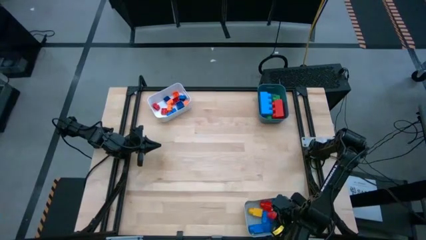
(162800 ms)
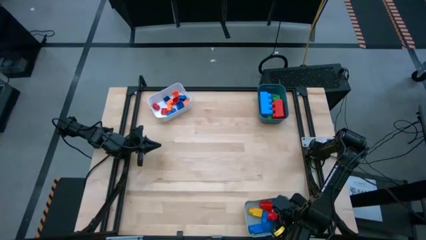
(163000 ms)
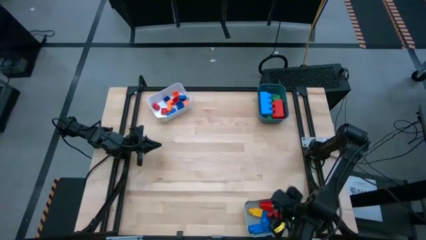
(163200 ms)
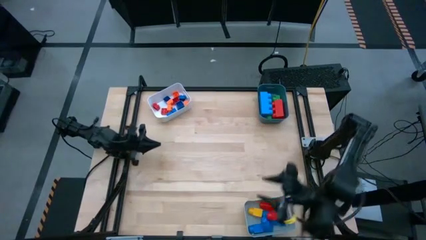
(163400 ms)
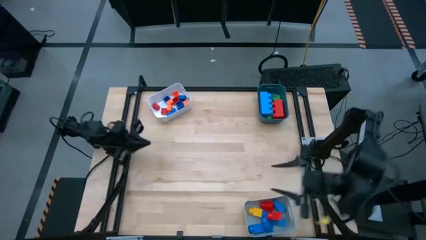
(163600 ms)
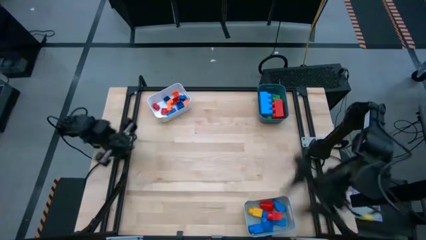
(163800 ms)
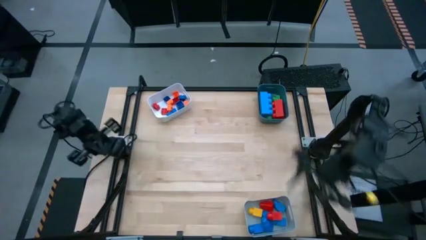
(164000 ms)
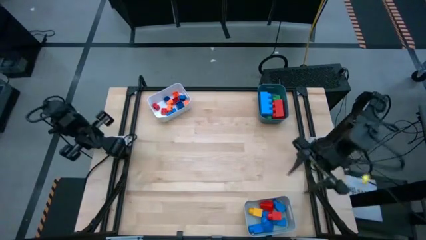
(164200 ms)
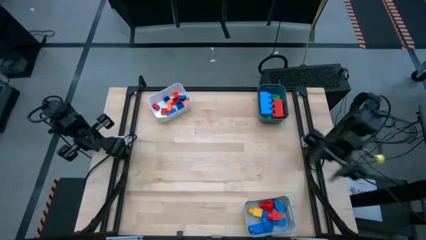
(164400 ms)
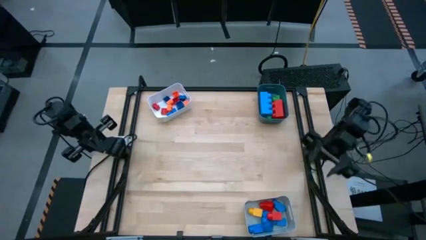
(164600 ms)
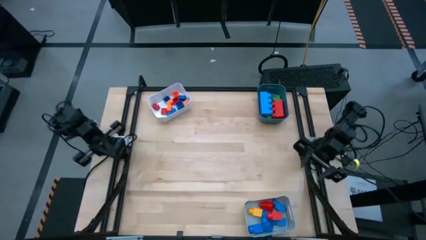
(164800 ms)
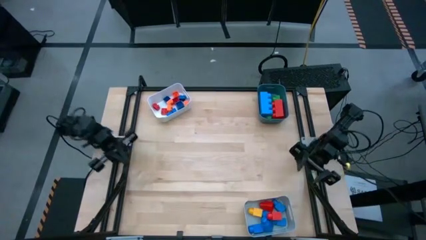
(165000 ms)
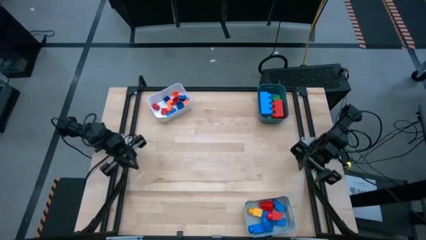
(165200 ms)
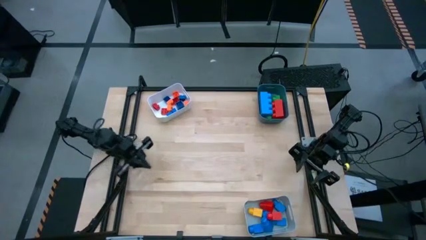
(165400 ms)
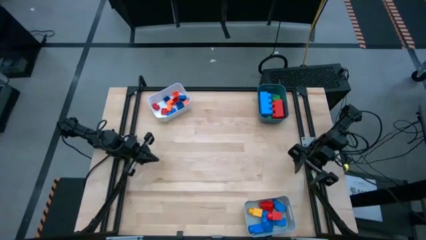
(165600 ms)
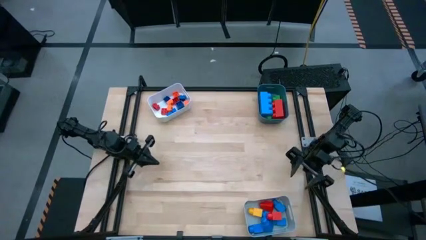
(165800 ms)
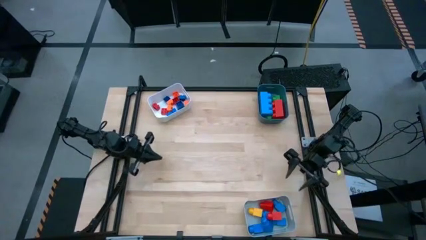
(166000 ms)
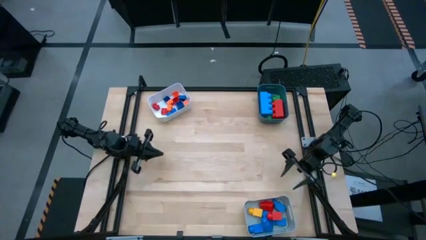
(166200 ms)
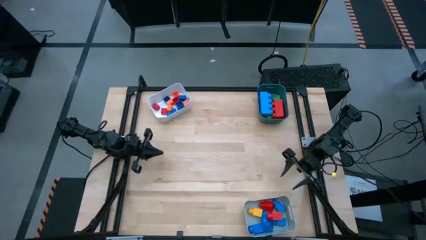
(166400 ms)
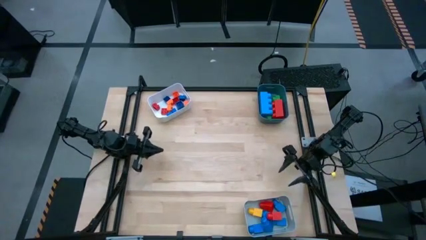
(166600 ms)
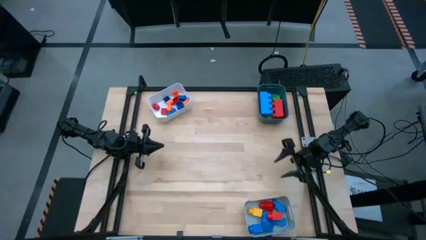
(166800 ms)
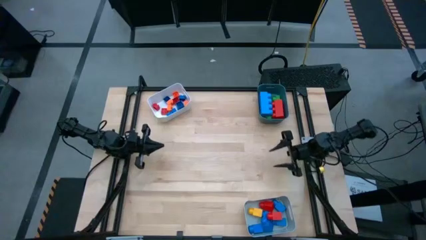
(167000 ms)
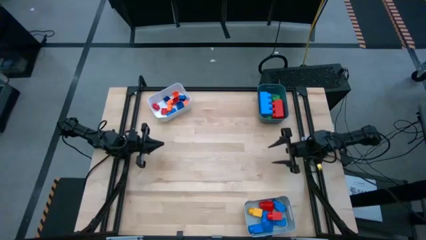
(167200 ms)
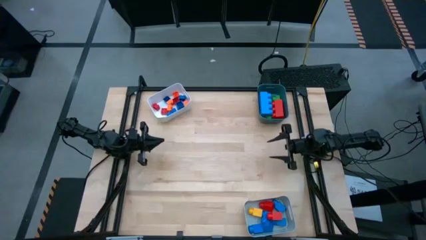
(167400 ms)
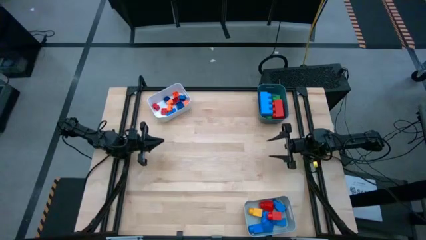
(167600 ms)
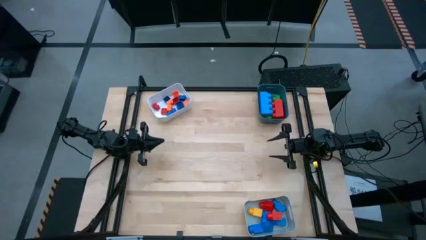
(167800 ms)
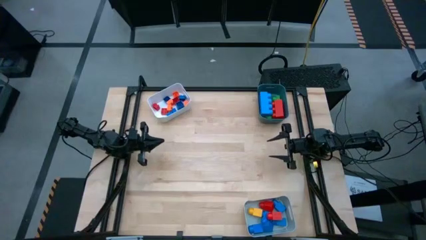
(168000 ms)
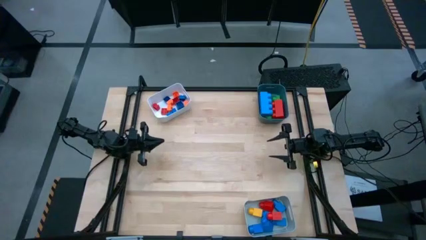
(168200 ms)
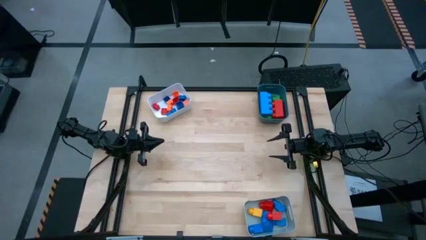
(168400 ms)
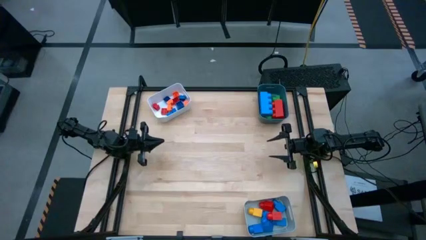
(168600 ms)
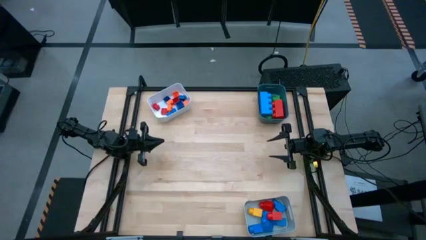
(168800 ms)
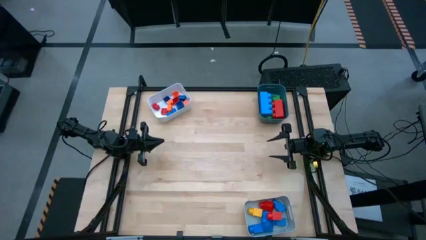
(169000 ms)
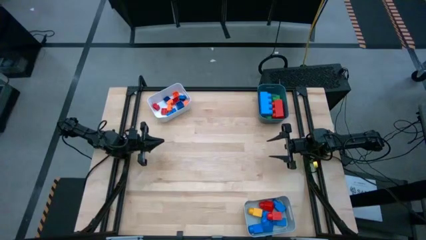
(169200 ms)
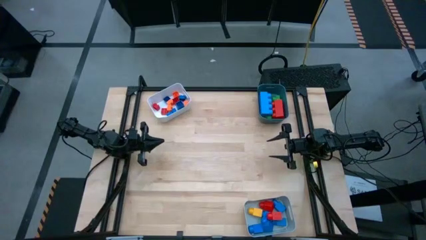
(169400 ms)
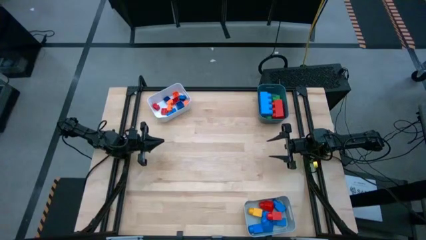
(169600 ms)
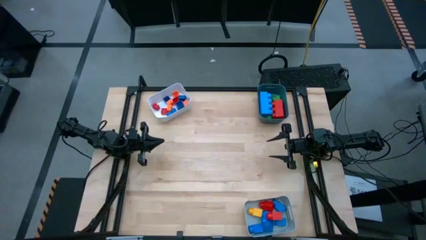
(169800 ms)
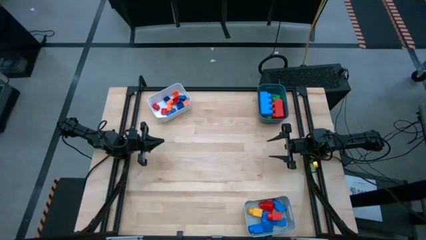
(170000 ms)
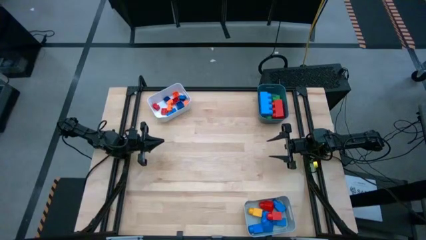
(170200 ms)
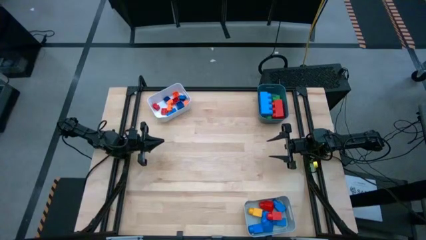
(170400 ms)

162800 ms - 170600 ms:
Task: Sort blocks by size
Return to Home Position

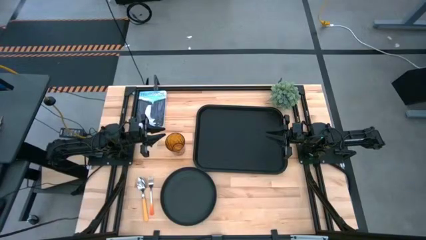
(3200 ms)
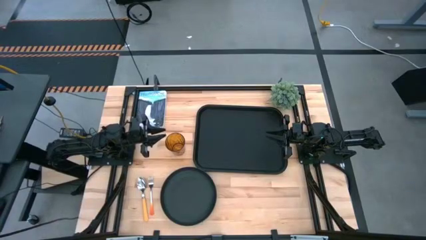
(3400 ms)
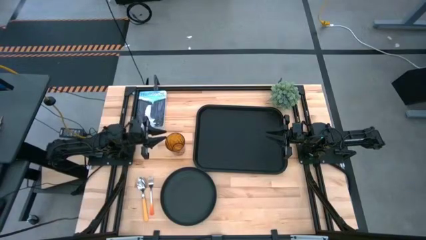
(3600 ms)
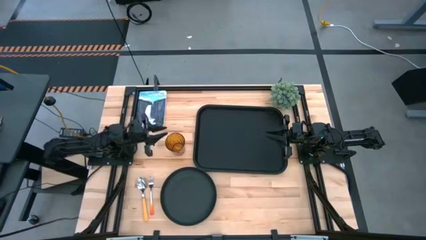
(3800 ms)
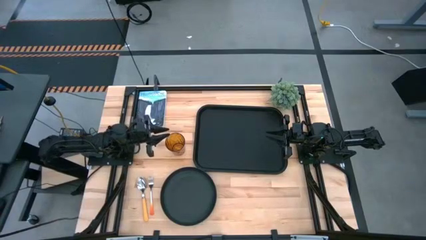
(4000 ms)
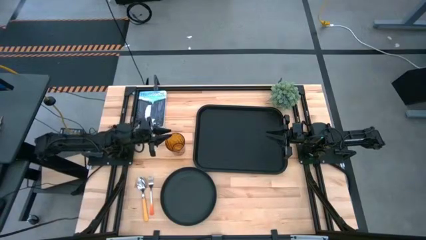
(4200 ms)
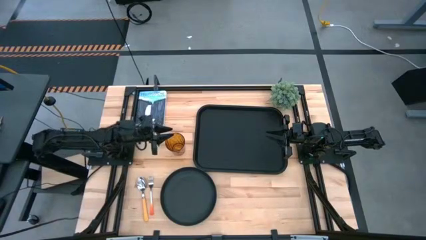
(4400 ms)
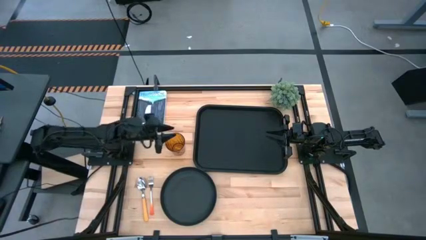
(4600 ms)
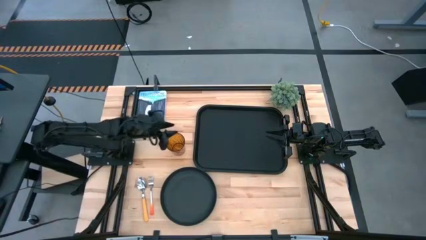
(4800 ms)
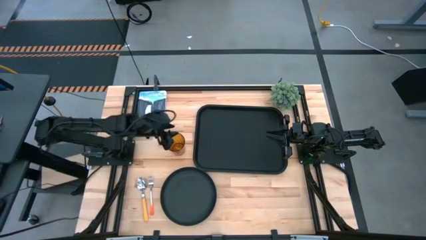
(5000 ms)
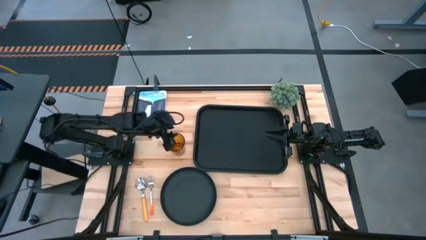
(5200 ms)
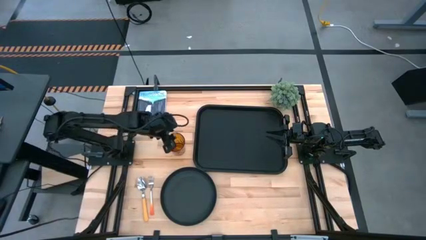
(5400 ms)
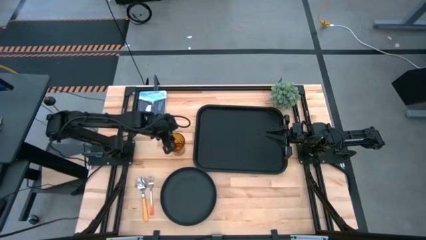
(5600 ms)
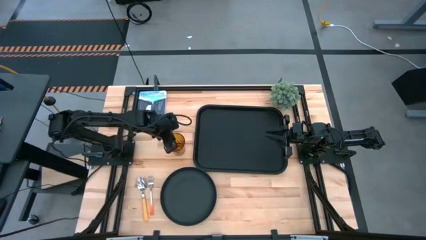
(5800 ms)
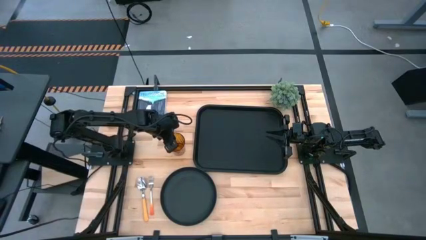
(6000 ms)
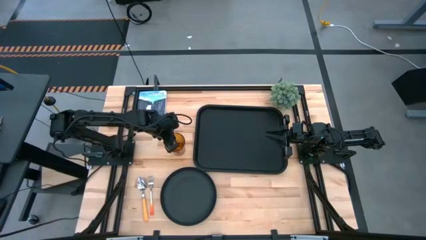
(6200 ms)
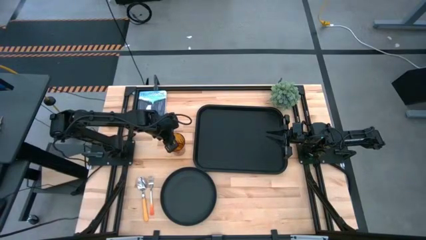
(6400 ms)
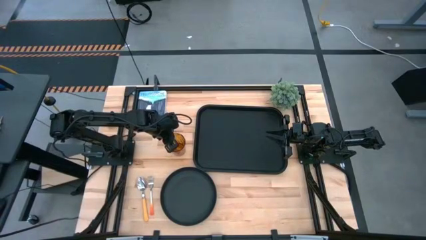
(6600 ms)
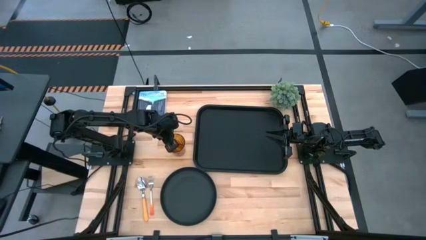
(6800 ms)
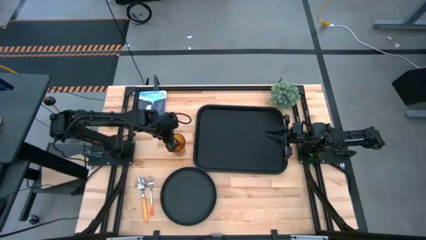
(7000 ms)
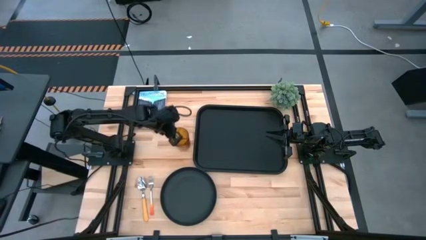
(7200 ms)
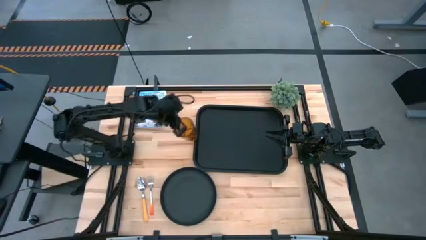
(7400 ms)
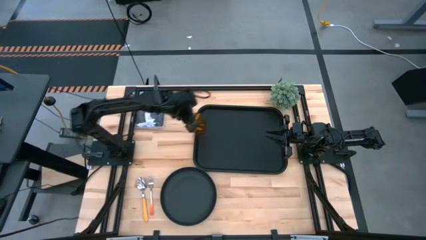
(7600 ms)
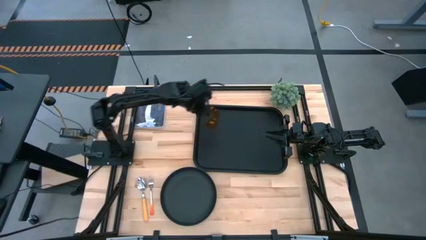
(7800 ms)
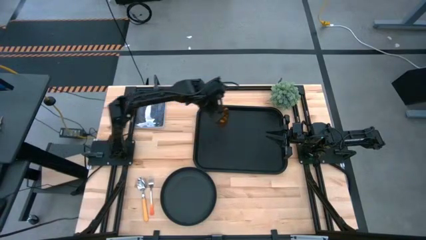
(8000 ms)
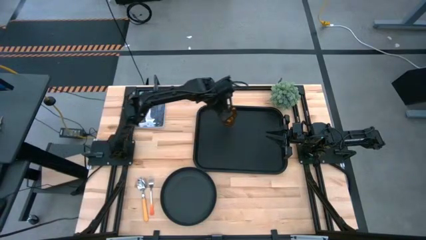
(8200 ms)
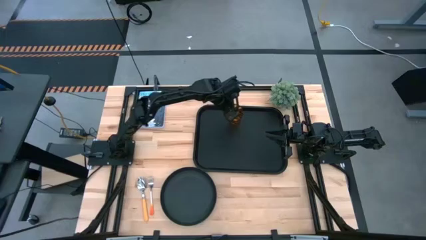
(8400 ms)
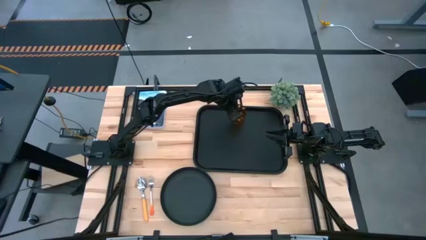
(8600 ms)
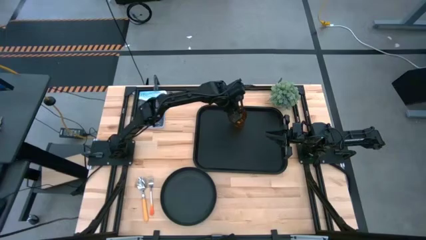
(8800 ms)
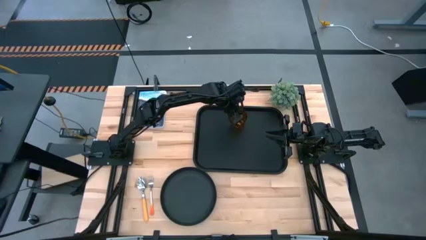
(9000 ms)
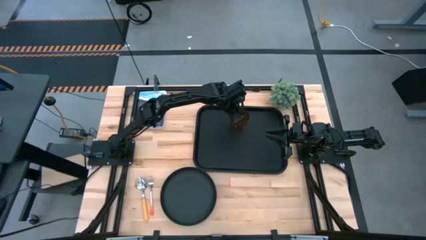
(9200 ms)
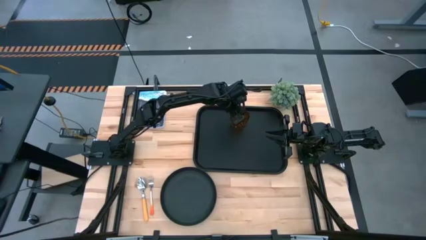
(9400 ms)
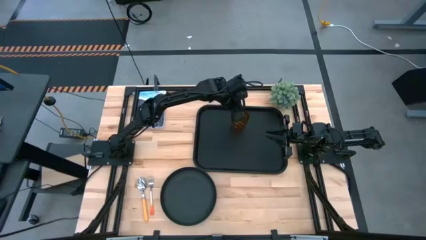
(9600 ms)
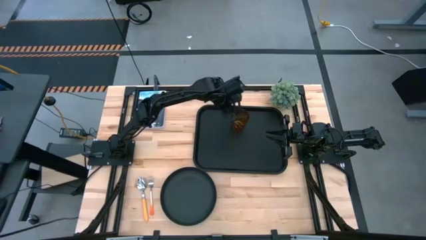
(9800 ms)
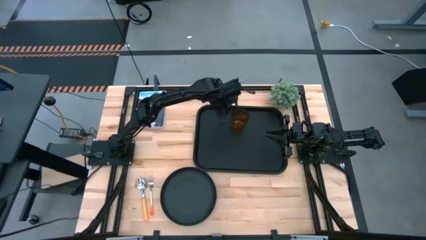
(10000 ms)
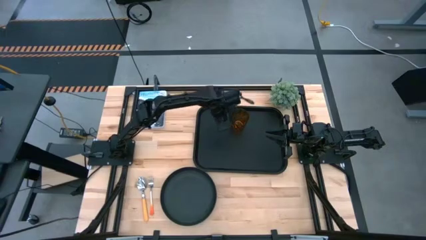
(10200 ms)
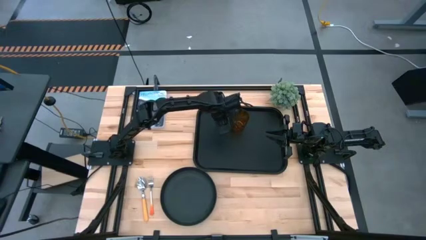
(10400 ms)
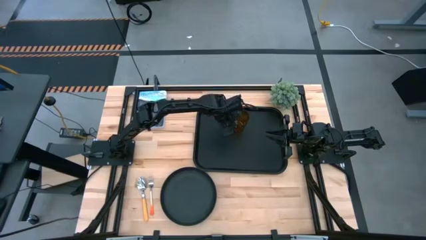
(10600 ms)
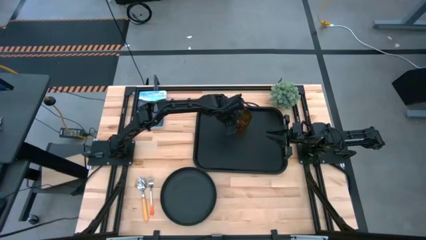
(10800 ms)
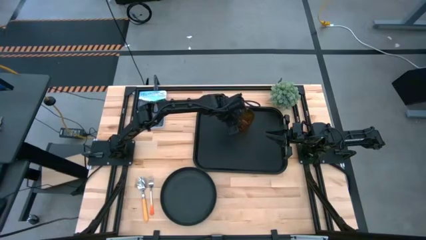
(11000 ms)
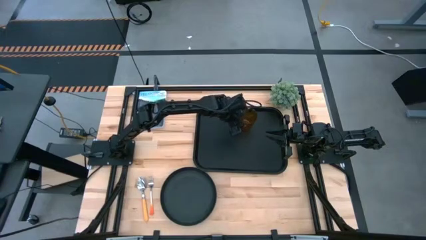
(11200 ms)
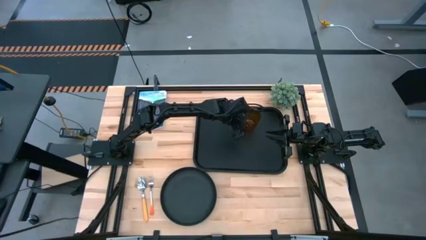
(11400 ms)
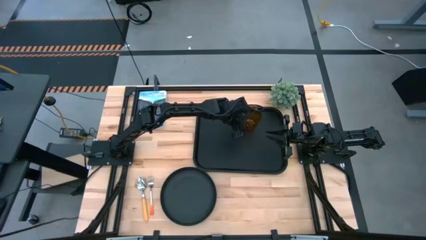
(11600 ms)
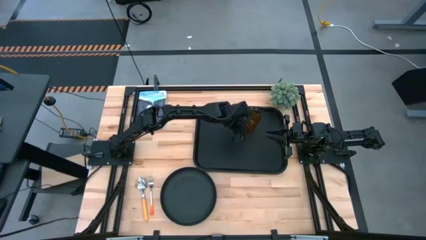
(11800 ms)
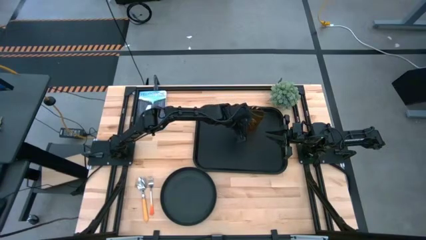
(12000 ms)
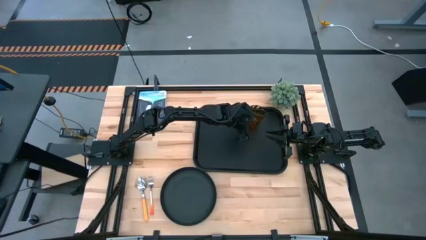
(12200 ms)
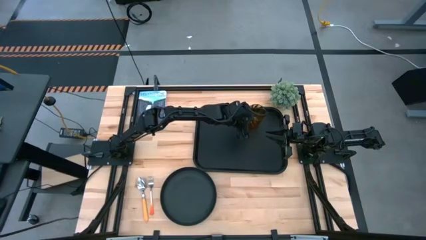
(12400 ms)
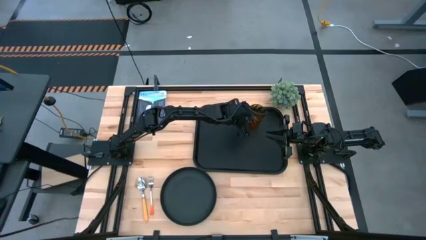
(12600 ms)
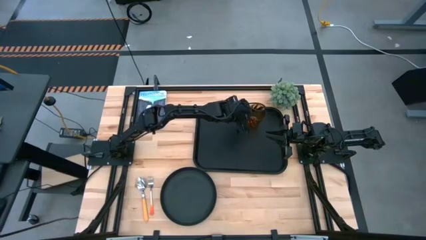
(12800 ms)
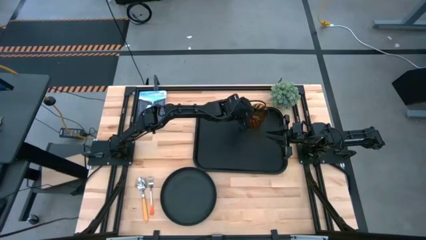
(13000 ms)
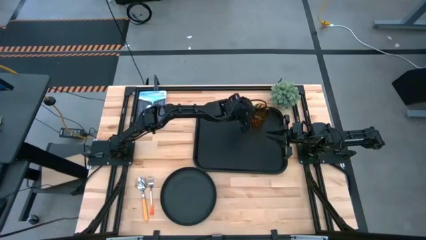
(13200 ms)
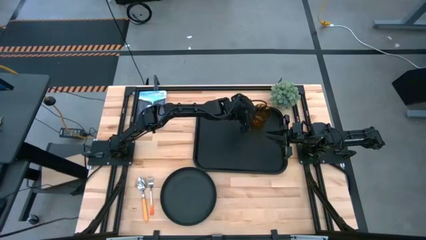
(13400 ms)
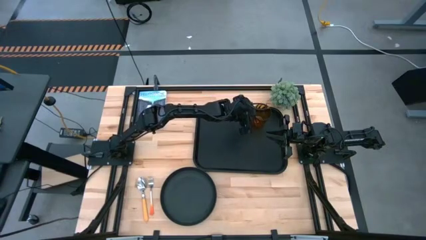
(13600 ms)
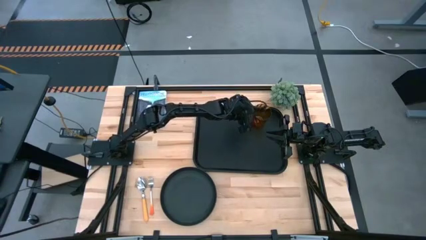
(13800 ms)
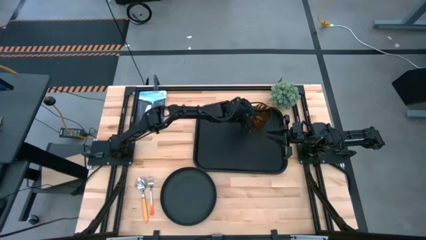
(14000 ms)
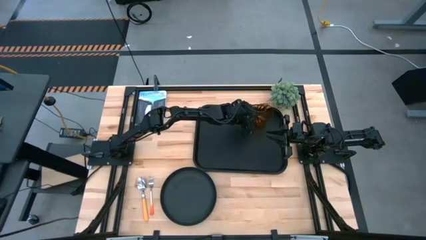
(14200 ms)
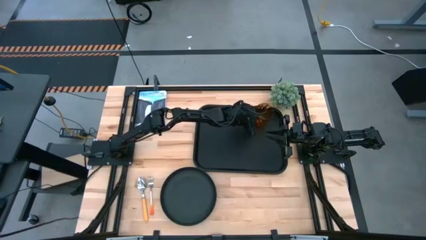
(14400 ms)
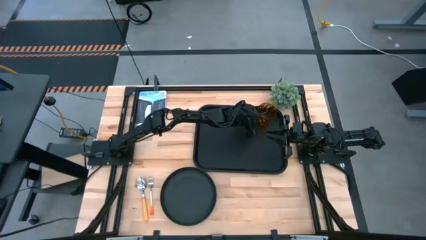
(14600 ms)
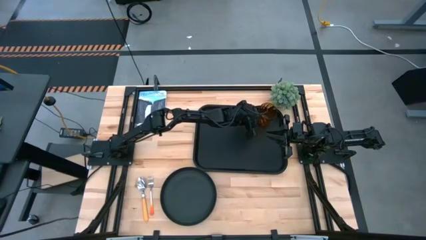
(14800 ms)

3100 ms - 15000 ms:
Task: Pick and place plate/cup/fork/spoon on tray
Put the brown glass on the top right of the black serving tray
